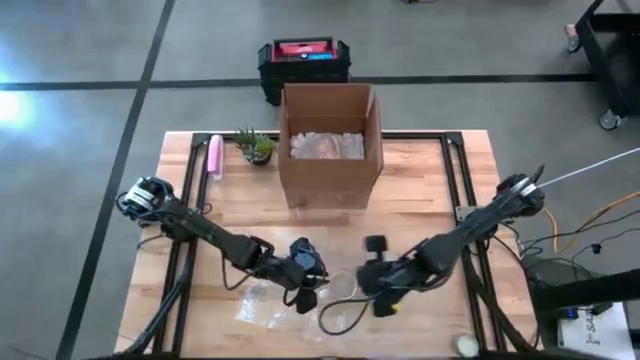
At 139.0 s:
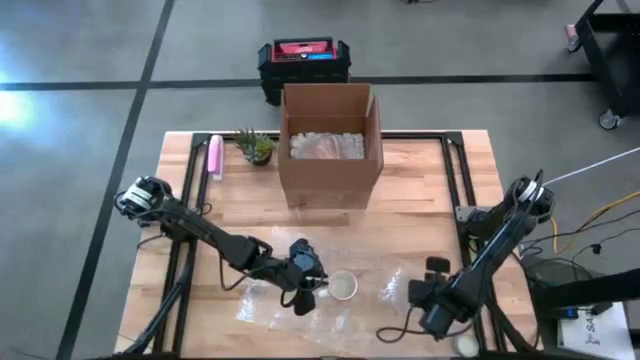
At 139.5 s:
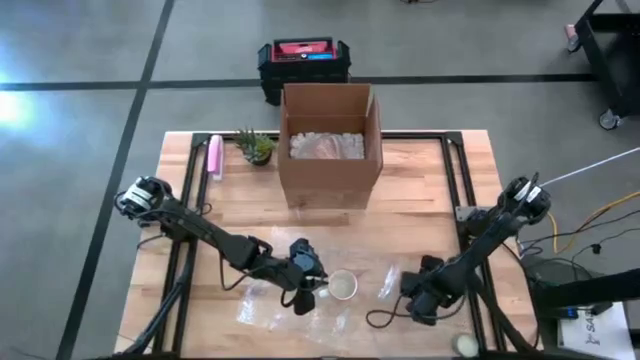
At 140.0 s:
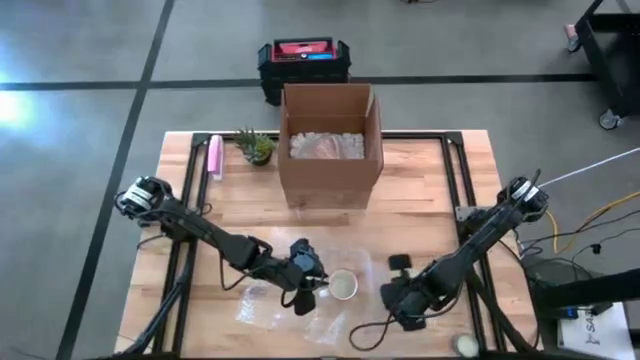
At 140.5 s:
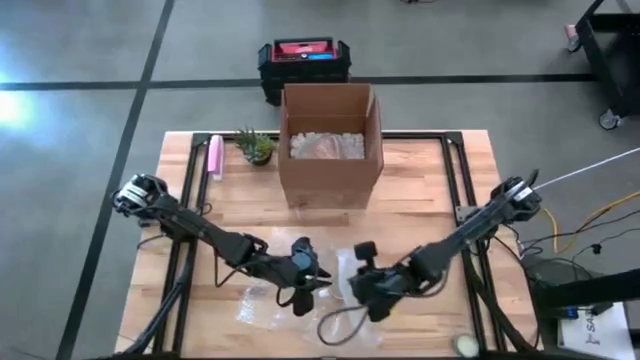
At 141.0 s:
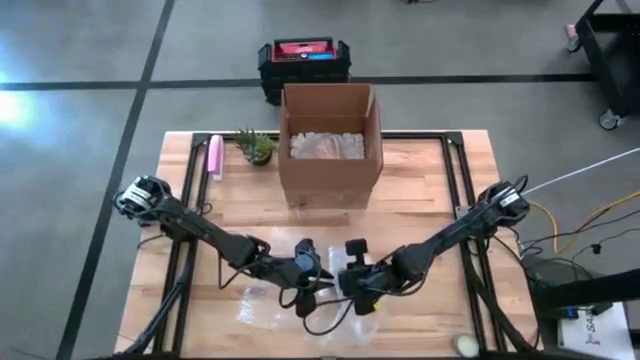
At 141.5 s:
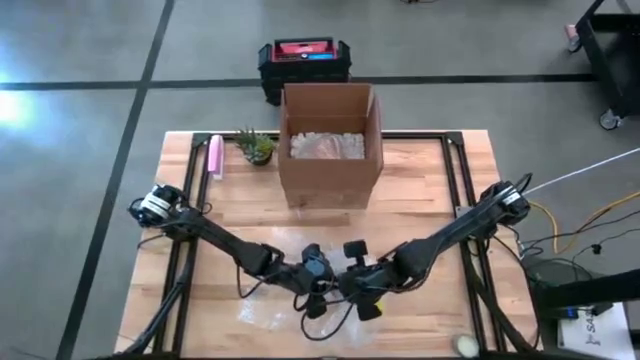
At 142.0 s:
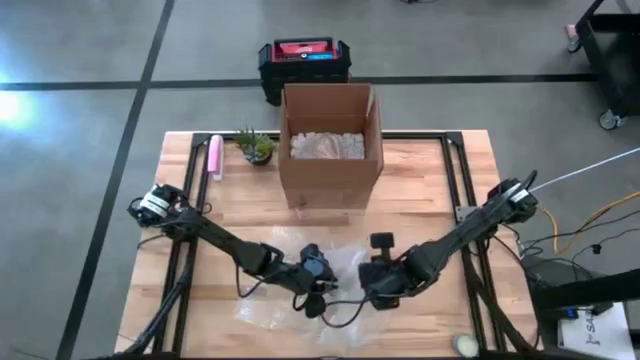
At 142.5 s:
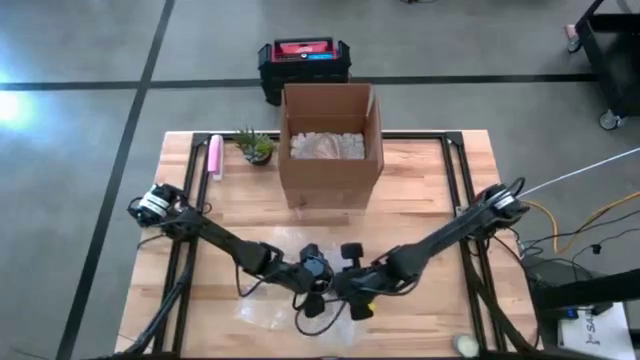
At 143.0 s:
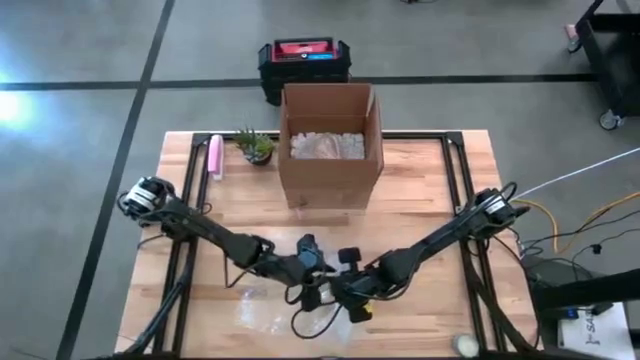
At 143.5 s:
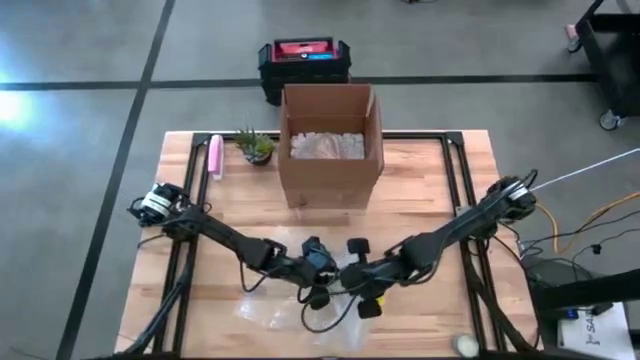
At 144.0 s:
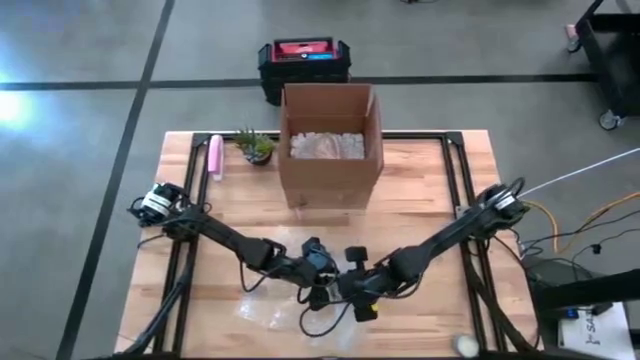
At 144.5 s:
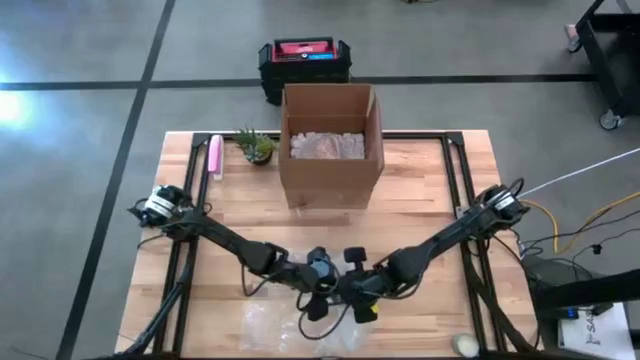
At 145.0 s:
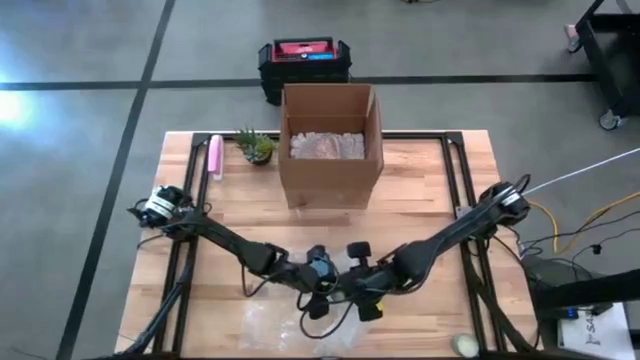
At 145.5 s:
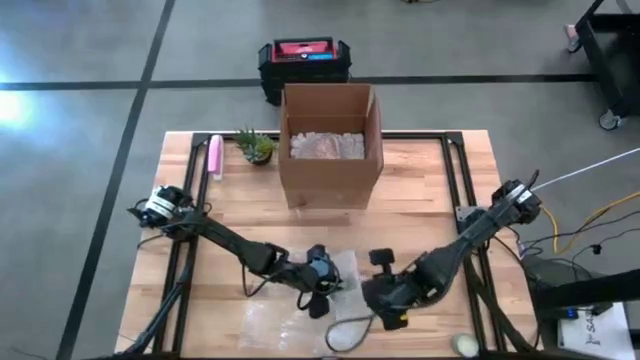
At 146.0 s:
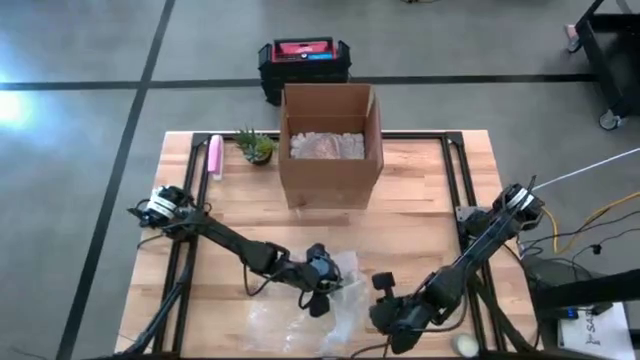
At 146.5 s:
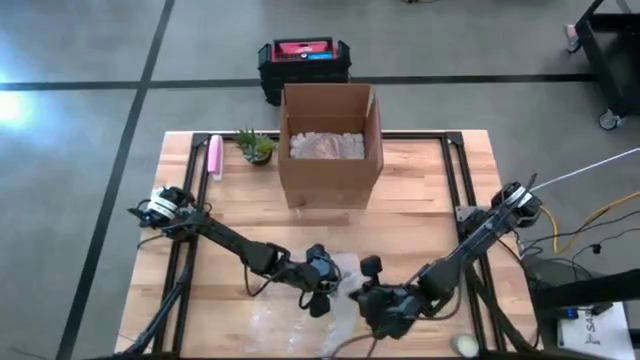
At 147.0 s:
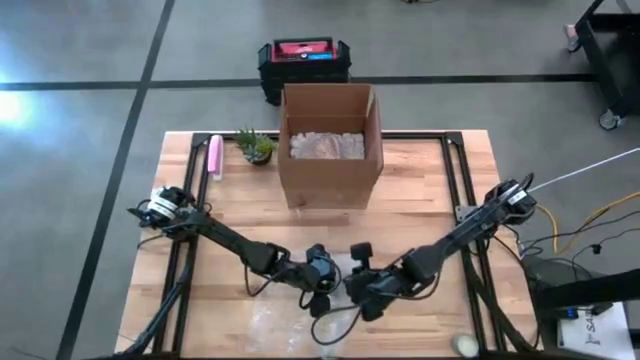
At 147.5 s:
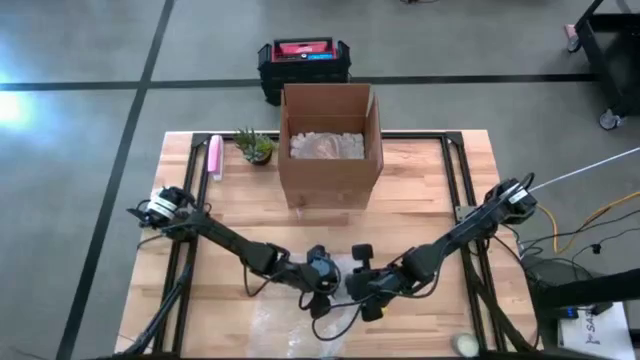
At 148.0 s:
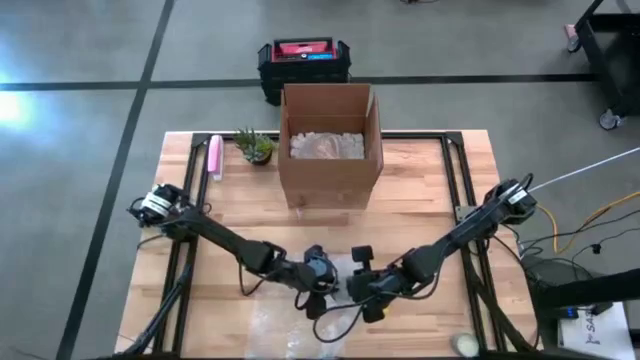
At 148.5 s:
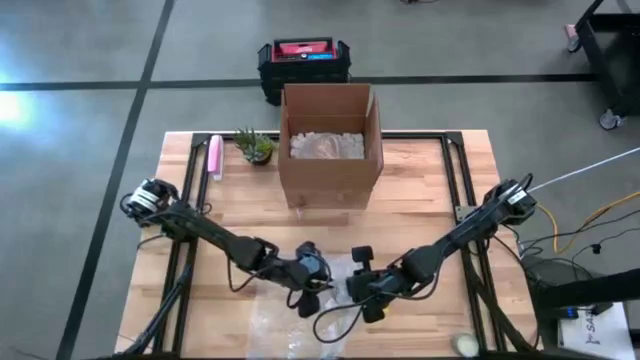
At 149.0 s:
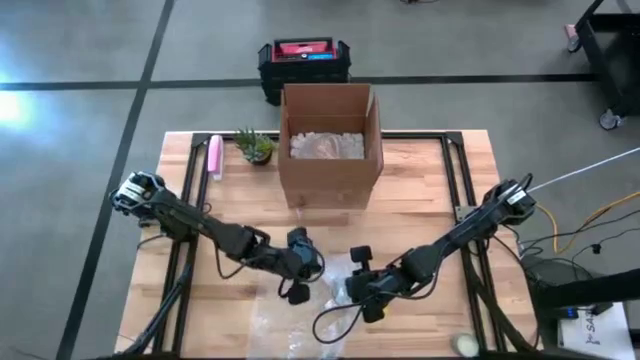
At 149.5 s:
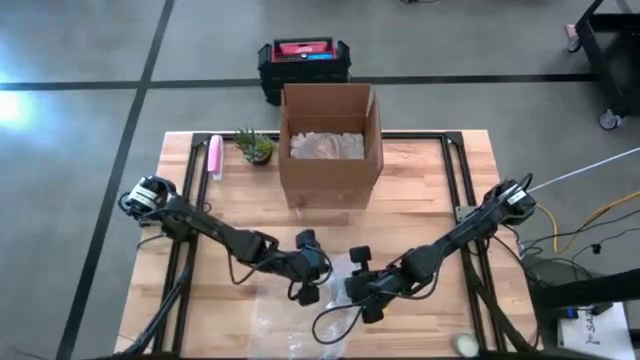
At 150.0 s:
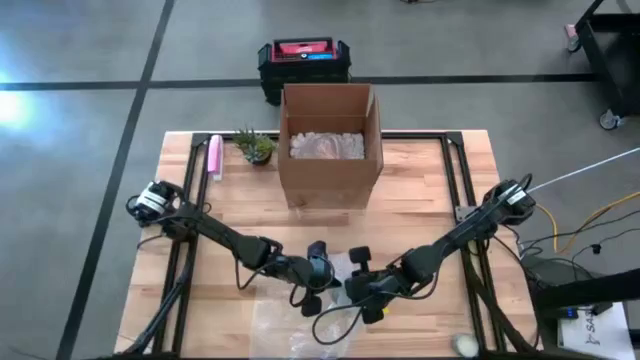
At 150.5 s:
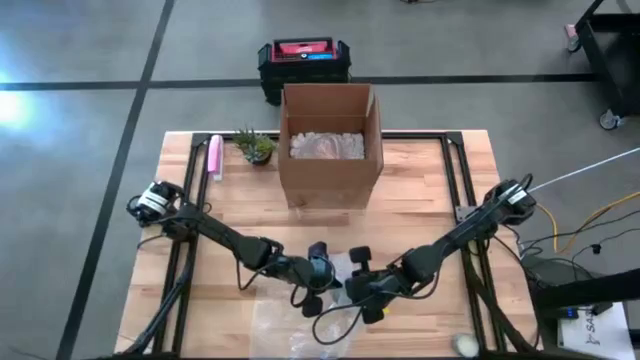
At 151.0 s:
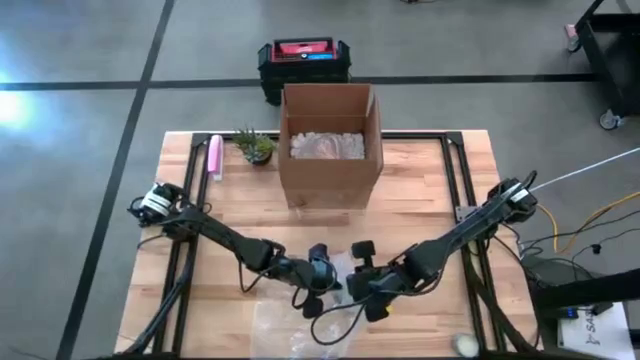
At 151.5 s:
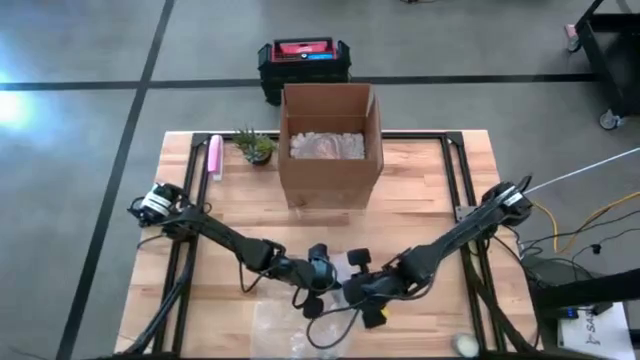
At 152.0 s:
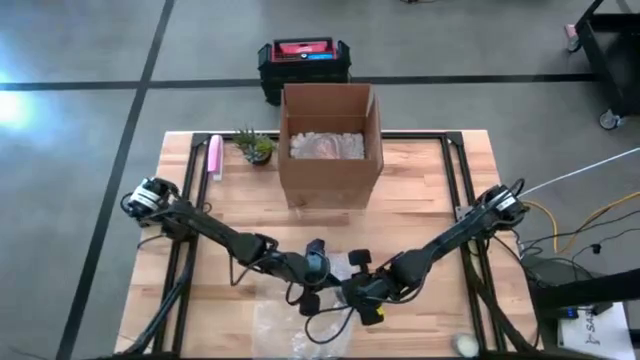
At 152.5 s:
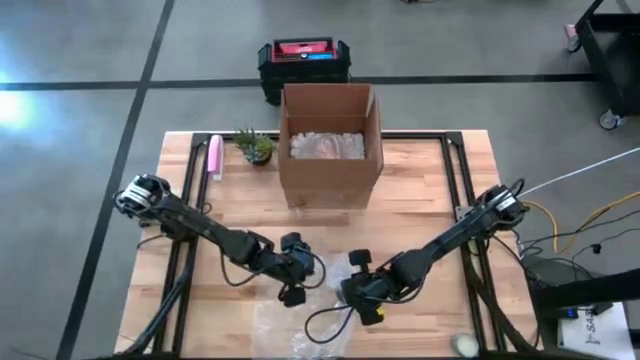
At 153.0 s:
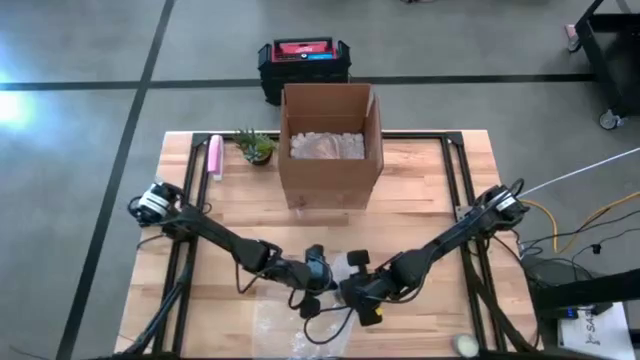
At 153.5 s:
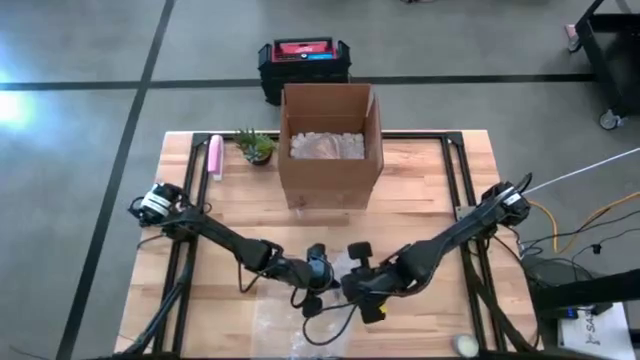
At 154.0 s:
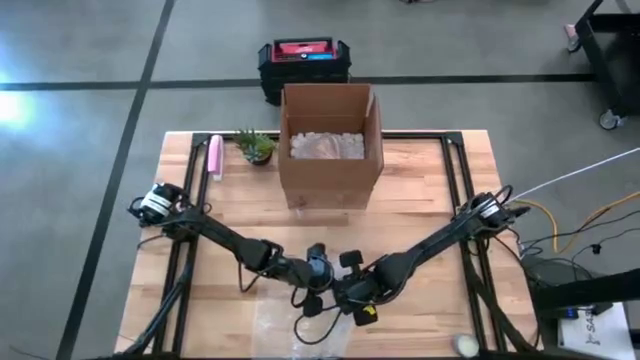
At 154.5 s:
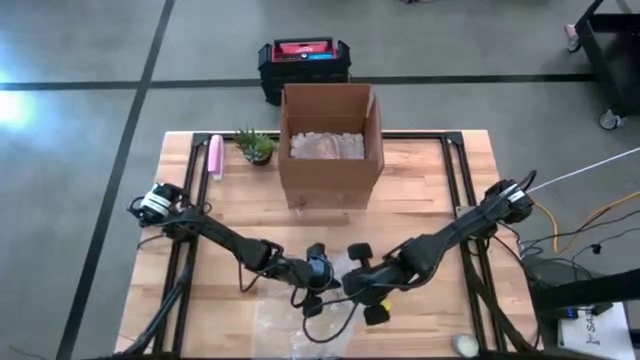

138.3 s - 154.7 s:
Task: wrap mug
Wrap the gray mug with the bubble wrap

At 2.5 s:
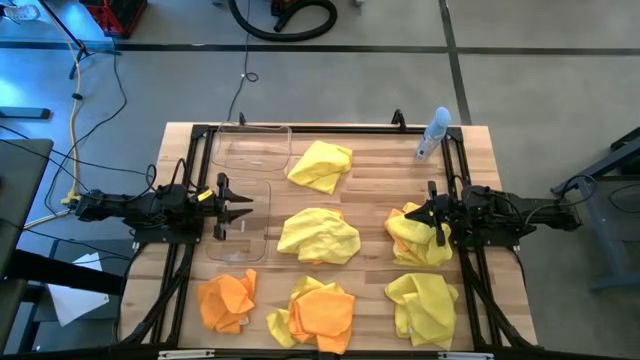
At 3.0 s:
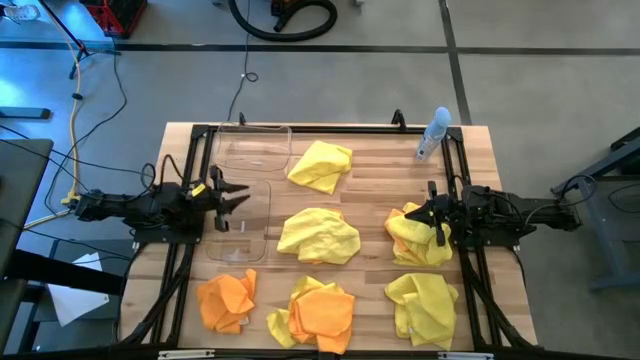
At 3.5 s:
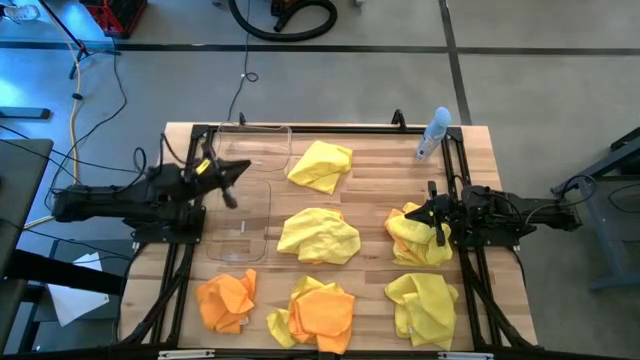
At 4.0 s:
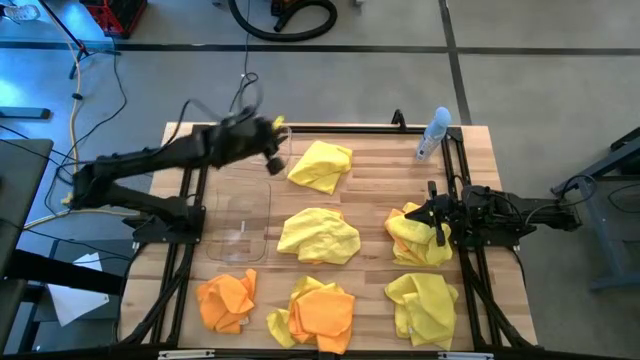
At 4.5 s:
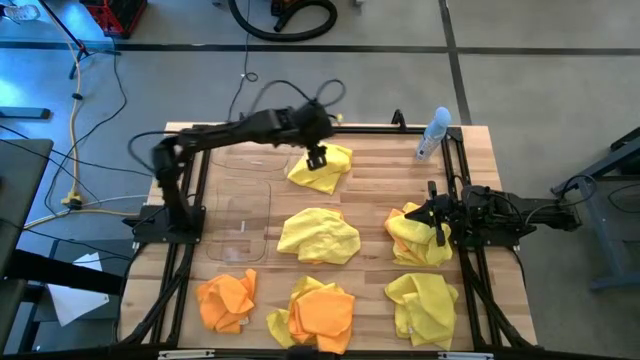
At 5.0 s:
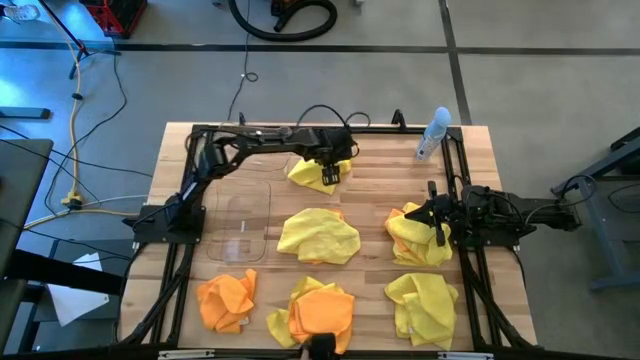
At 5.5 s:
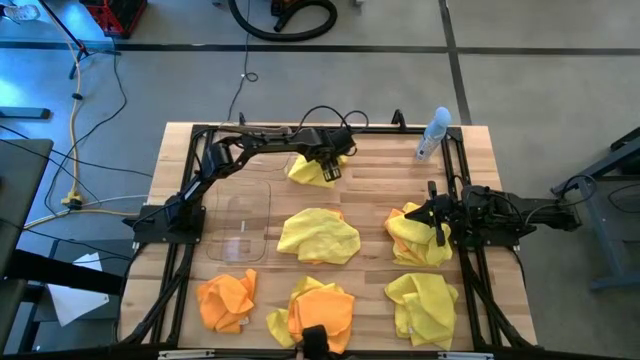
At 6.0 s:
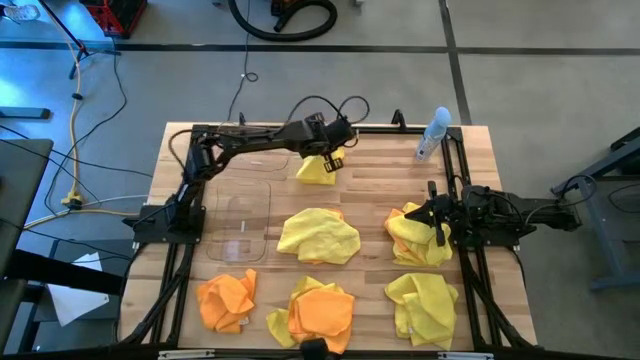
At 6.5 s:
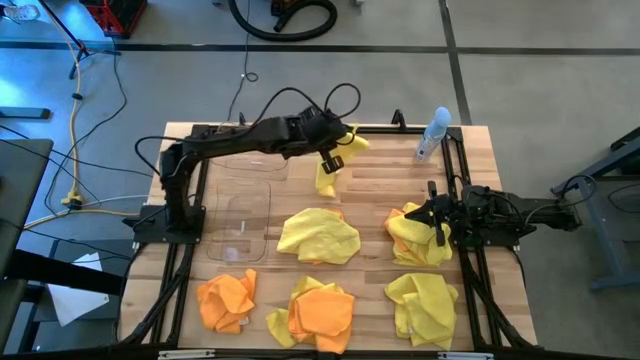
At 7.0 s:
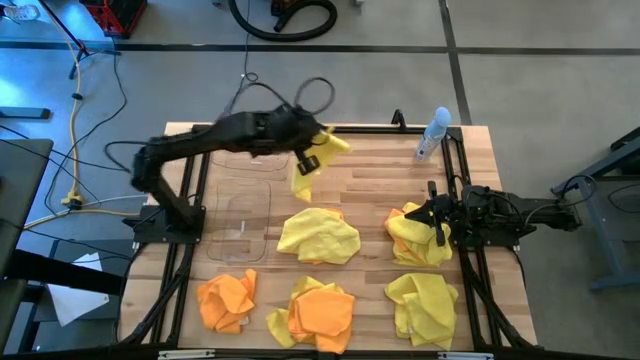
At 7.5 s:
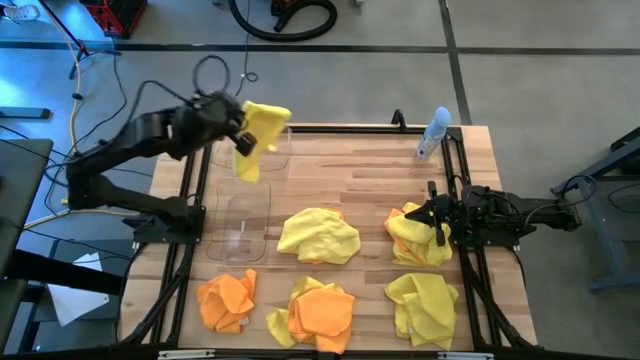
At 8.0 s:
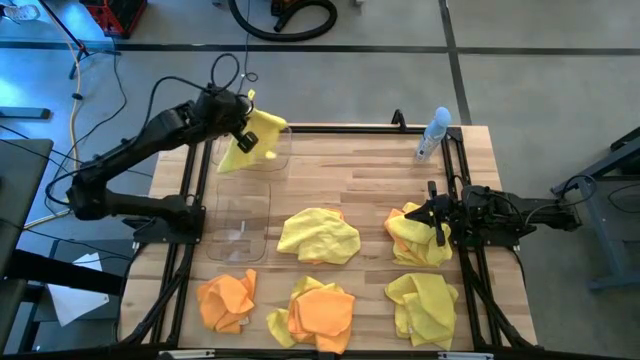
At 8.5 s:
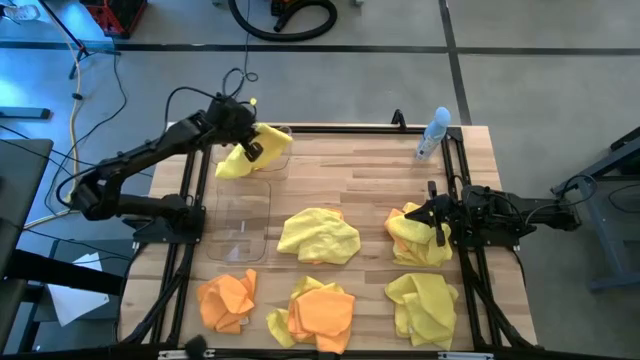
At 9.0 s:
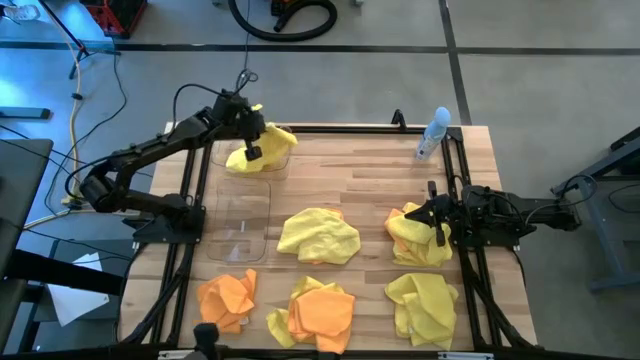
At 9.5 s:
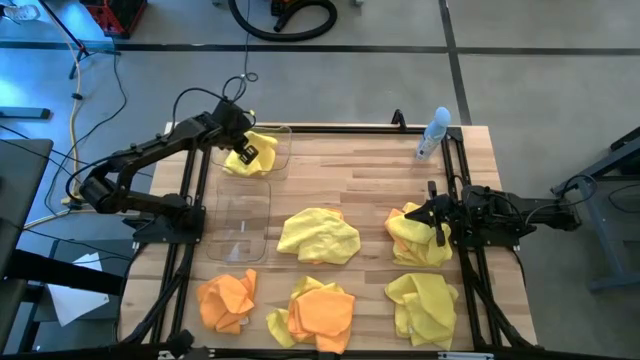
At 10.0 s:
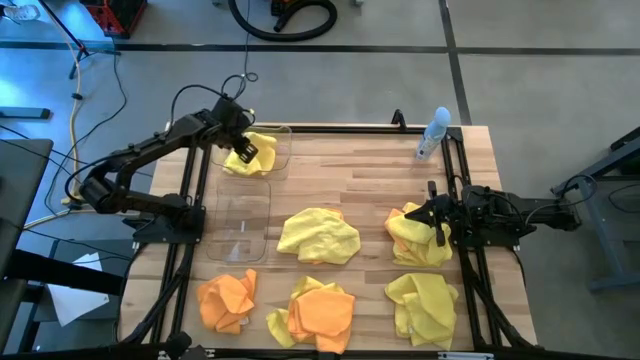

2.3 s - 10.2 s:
Task: Sort microfiber towel by color & place in baskets
Put the yellow microfiber towel into the top transparent bin
